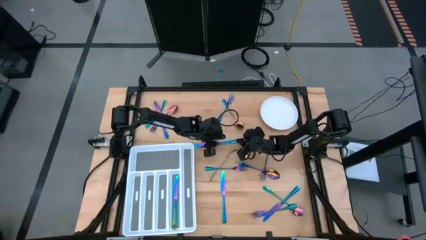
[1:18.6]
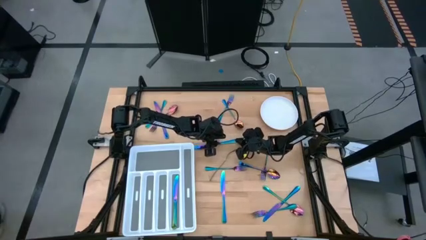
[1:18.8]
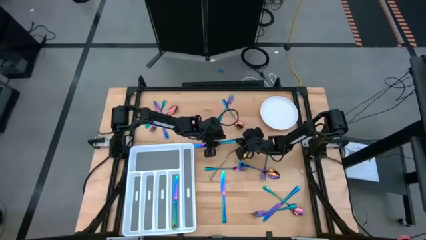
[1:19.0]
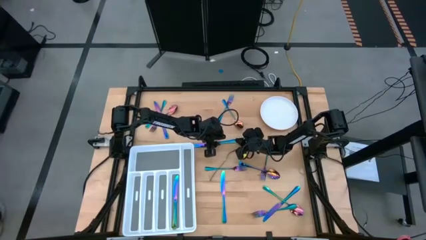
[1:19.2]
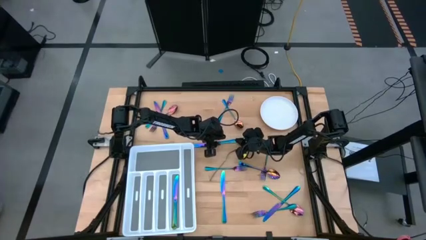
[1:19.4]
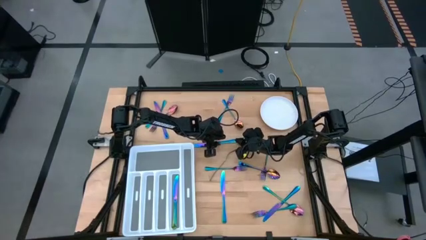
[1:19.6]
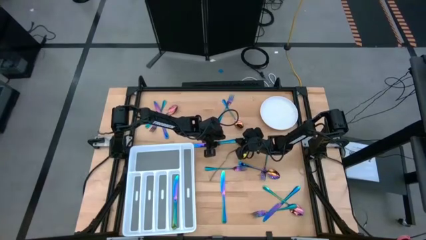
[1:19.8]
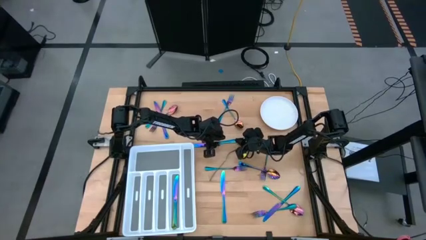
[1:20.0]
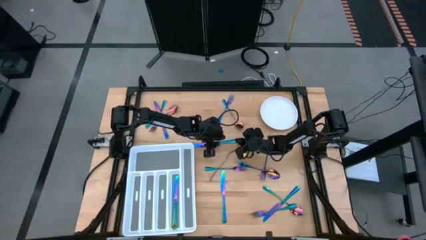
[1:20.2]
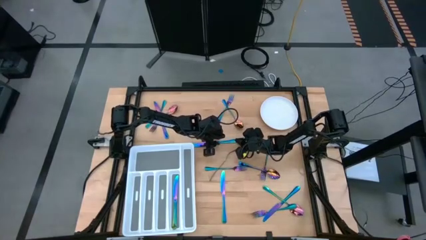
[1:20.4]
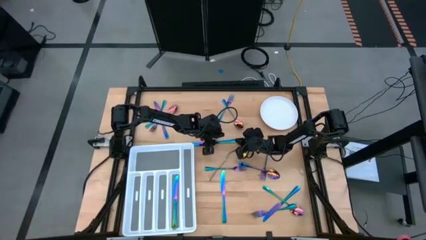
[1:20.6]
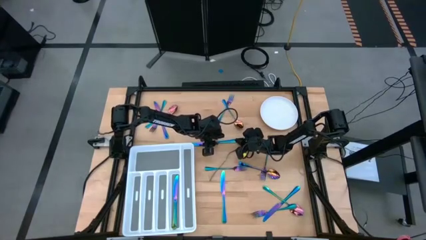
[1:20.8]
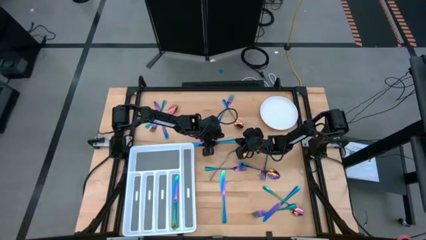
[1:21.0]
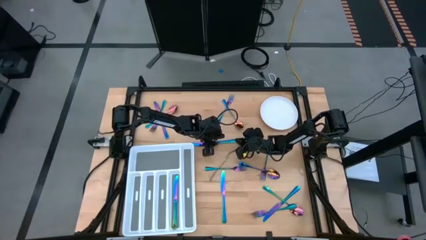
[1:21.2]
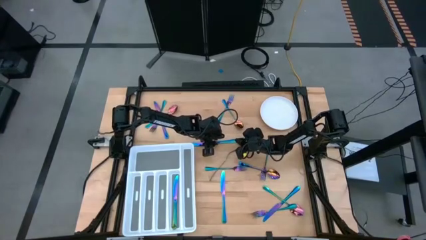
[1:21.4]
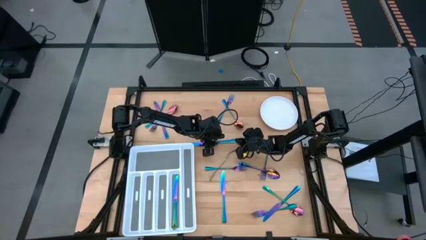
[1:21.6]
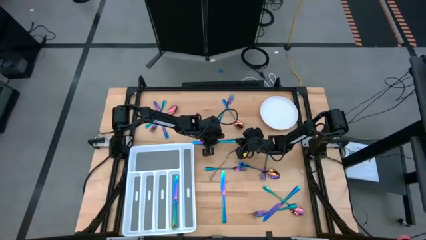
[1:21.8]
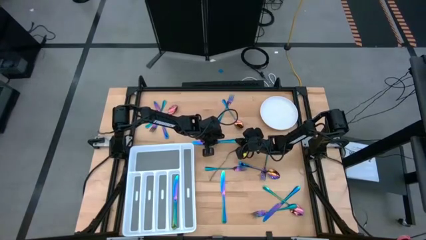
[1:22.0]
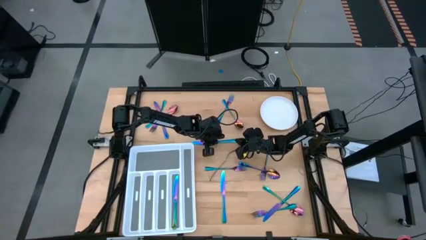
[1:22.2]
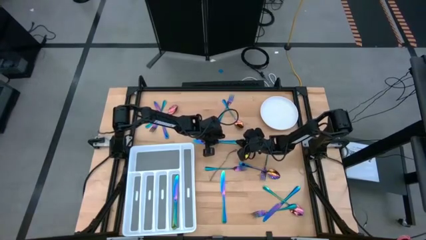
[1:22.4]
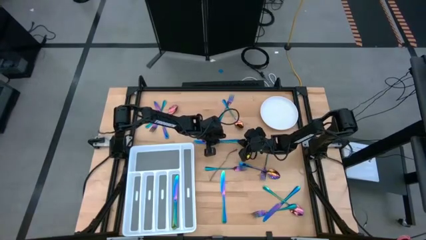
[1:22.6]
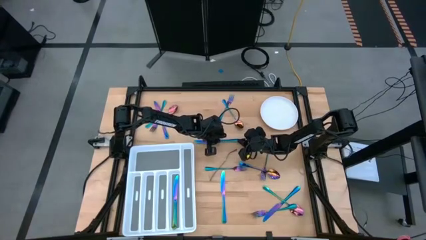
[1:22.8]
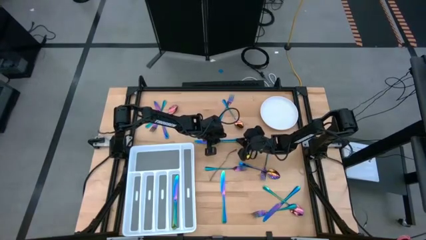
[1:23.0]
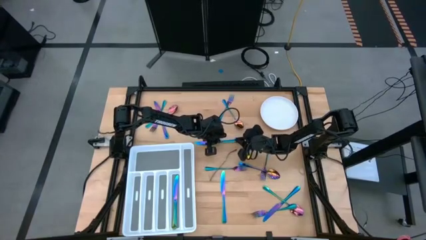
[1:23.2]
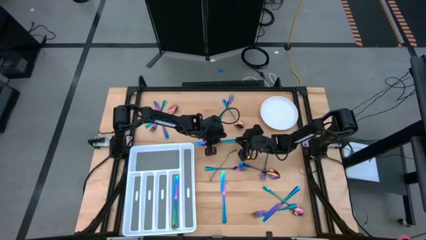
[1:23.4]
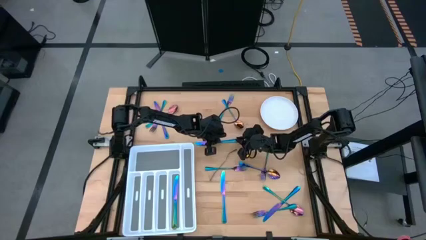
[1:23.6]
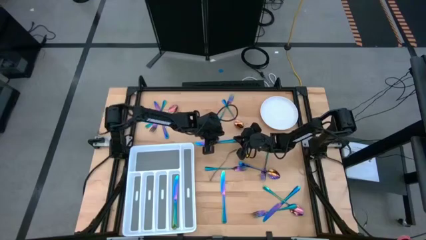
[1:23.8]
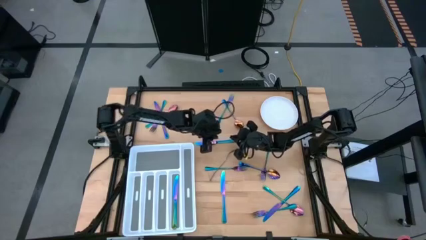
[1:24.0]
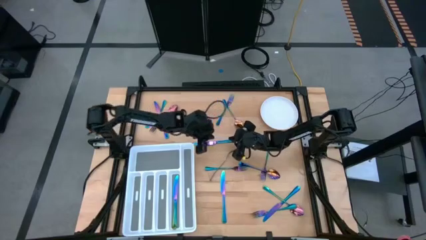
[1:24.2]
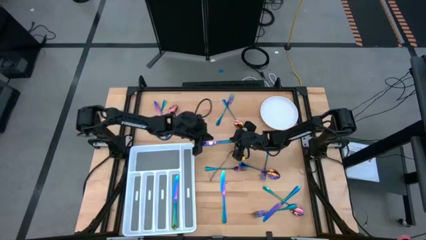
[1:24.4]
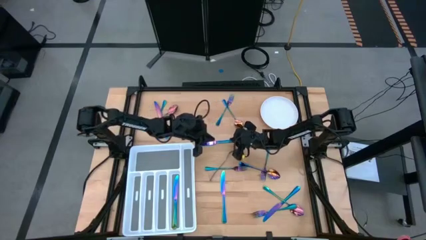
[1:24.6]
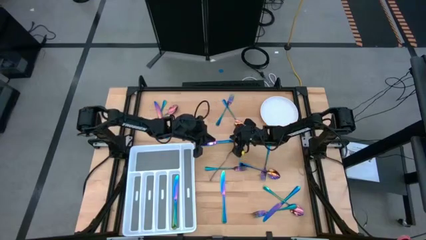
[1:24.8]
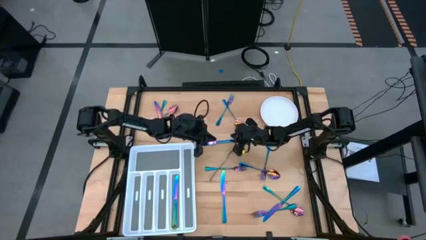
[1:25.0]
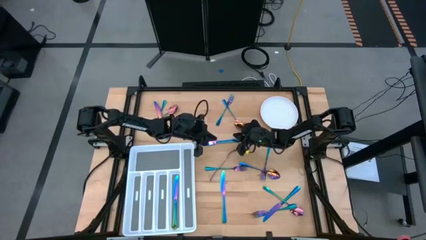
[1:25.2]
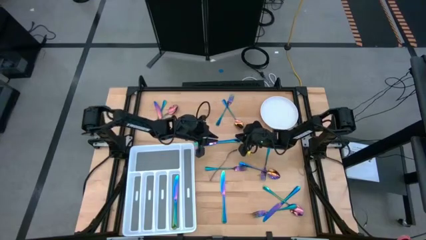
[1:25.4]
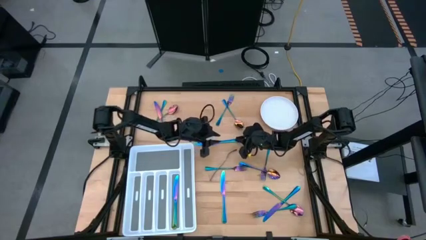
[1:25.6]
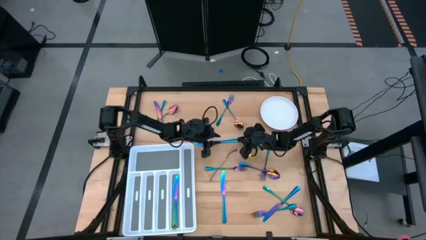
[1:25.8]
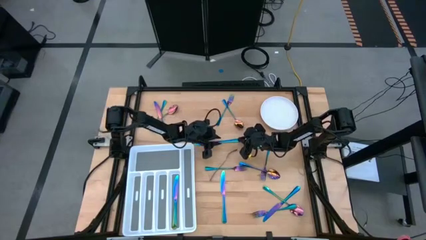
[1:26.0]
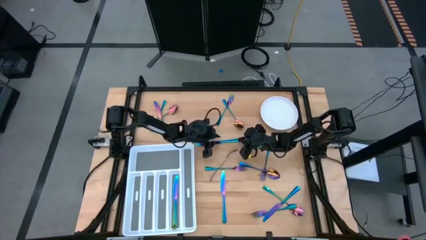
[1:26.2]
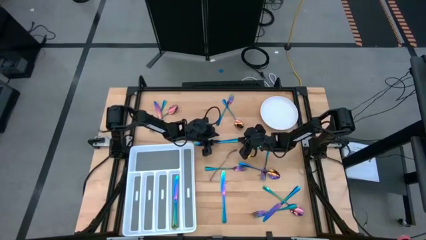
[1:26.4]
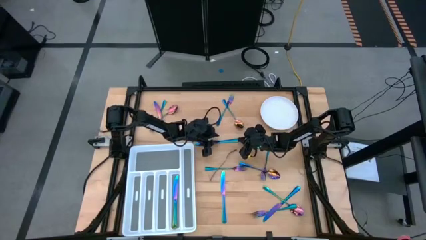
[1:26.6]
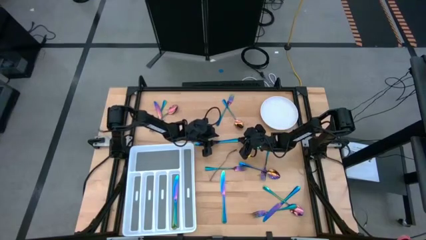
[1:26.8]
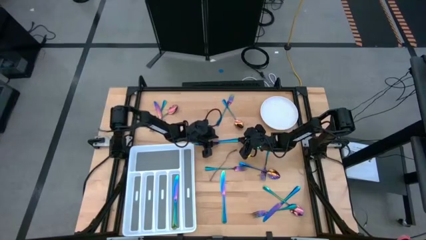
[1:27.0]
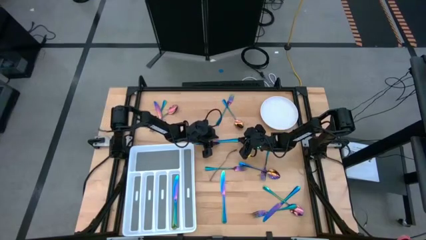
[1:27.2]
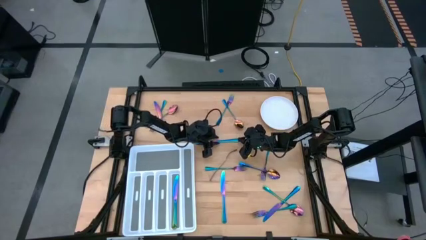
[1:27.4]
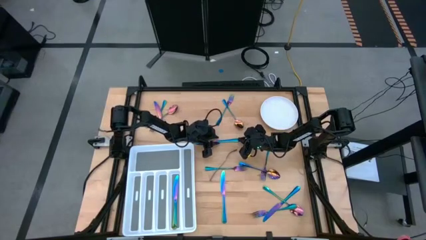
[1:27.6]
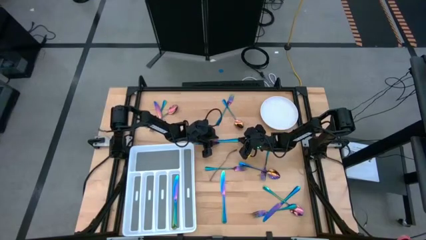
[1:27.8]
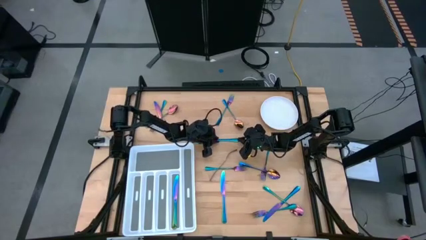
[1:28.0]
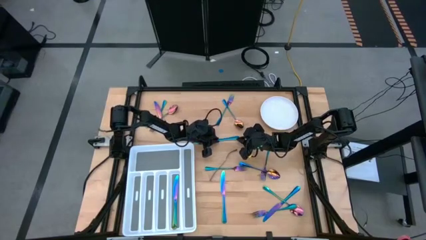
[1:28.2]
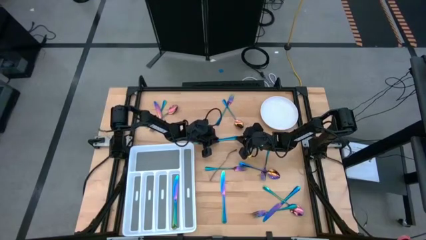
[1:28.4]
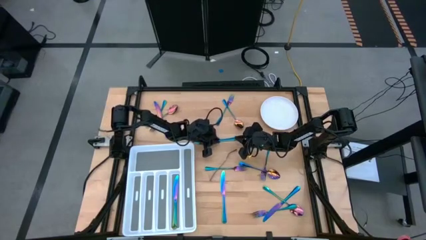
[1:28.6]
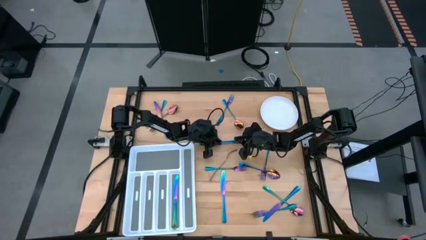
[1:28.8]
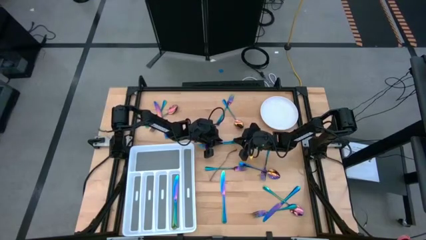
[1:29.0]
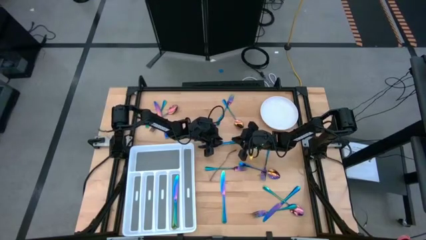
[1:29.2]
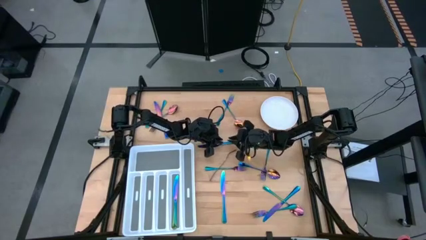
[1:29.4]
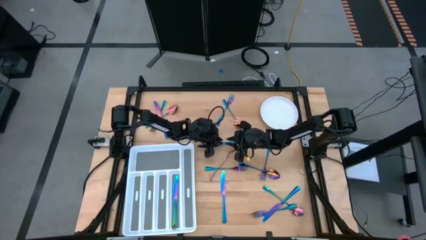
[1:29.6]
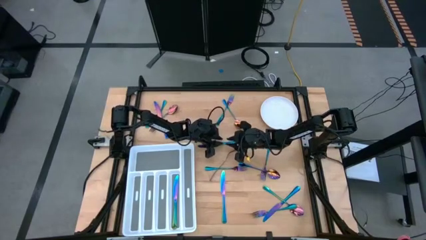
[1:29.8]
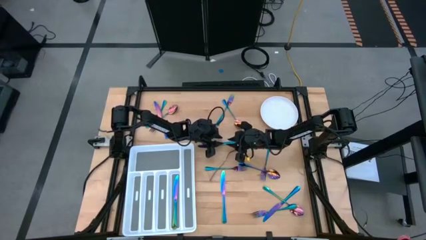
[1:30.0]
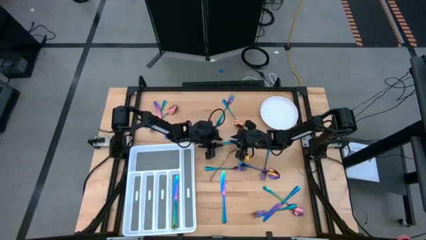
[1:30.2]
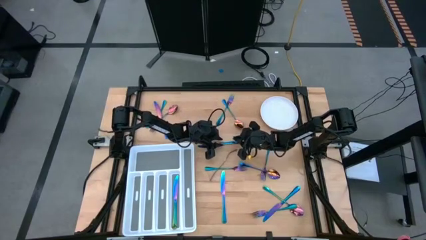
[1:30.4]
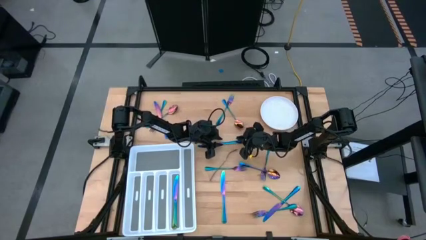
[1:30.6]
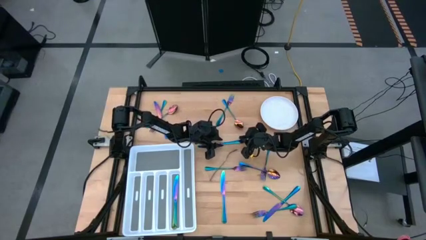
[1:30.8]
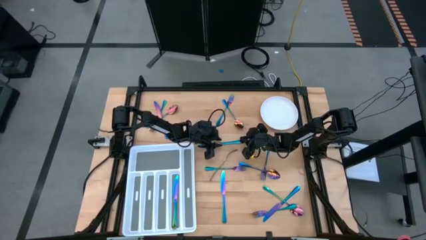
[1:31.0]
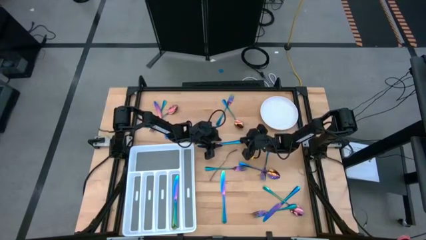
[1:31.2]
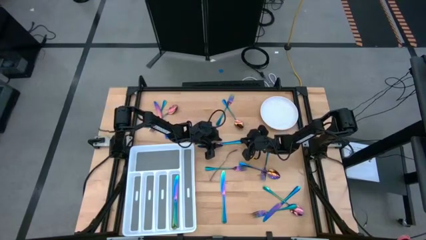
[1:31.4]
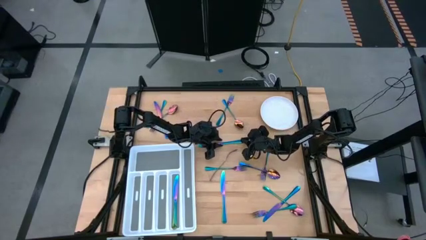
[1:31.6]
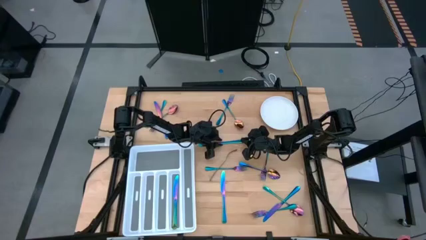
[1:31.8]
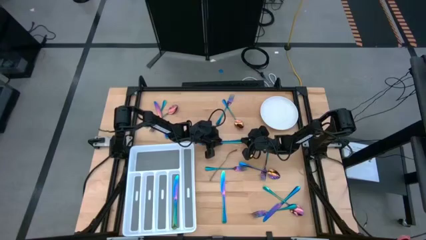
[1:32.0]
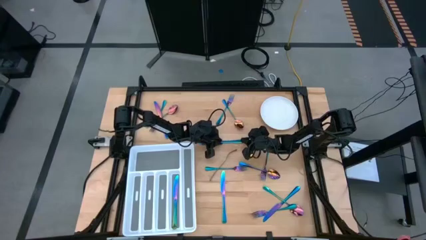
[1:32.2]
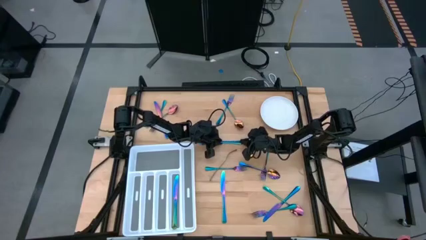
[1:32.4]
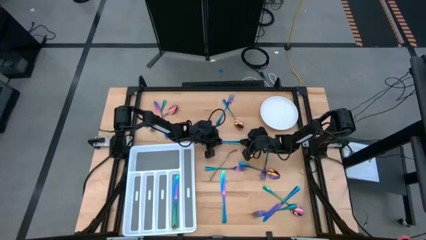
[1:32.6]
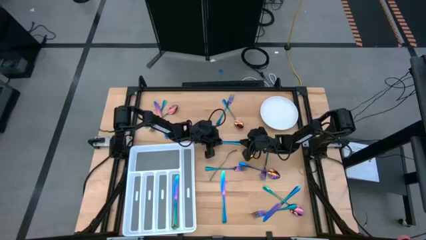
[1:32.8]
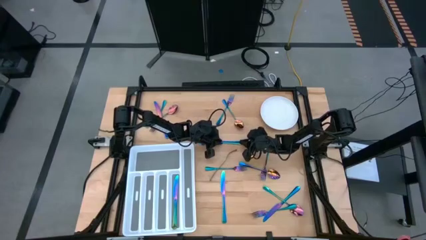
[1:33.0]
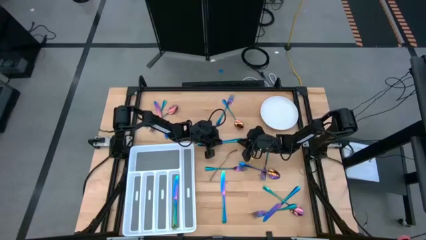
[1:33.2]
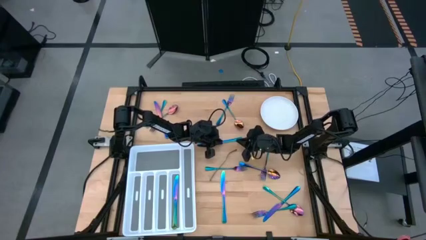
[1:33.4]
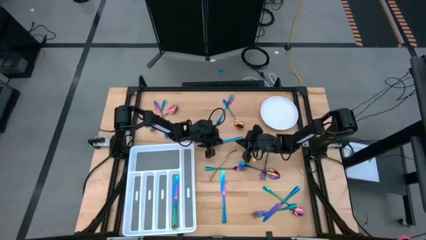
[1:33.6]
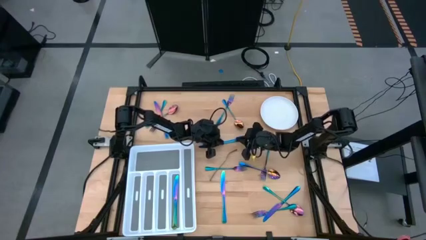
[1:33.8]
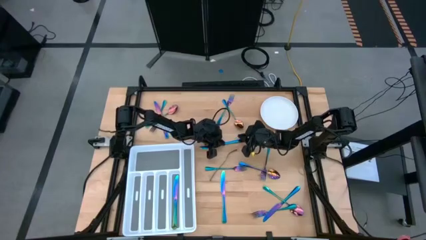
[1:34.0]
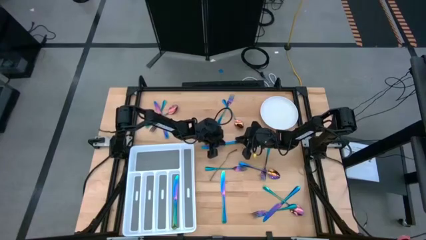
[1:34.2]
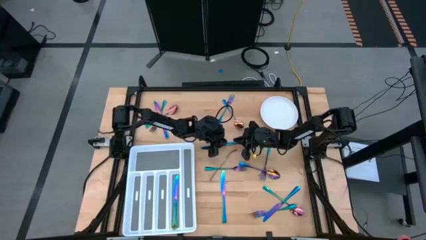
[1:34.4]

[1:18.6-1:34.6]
Task: Sort silverware
Put the top right iridescent knife into the cutlery tray
